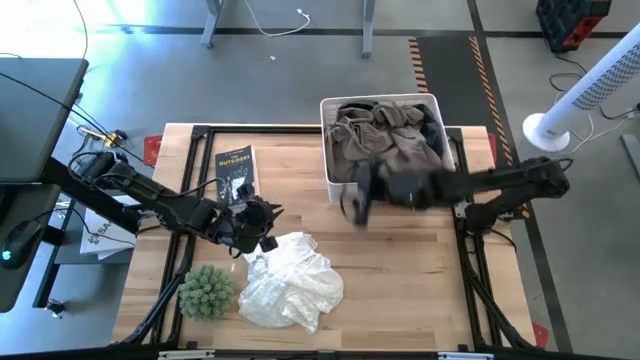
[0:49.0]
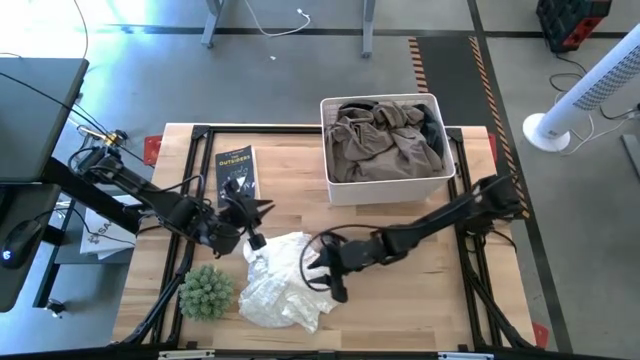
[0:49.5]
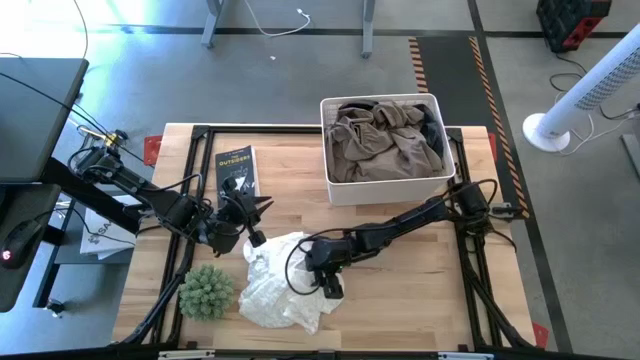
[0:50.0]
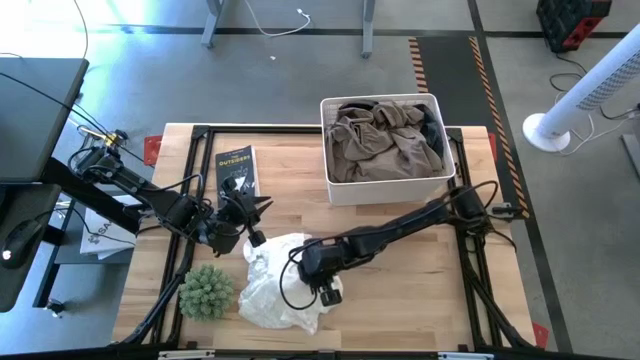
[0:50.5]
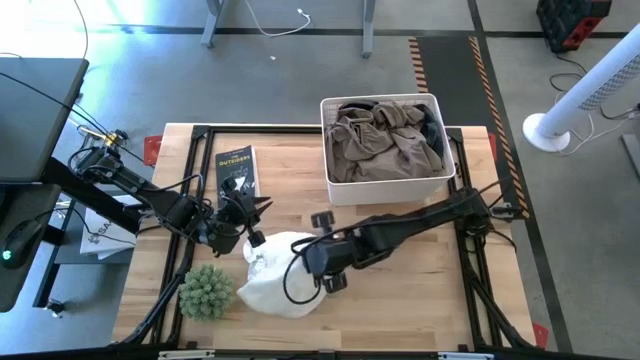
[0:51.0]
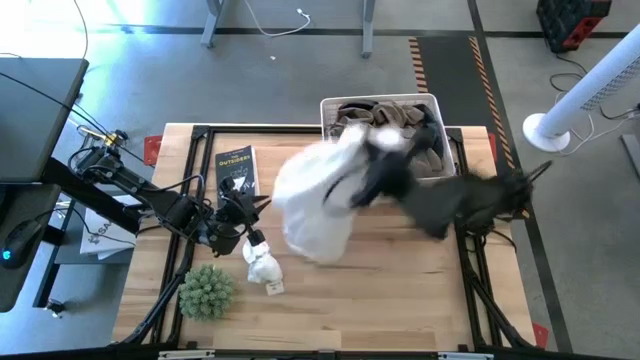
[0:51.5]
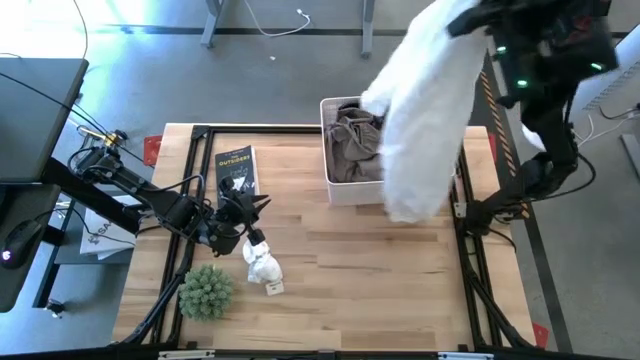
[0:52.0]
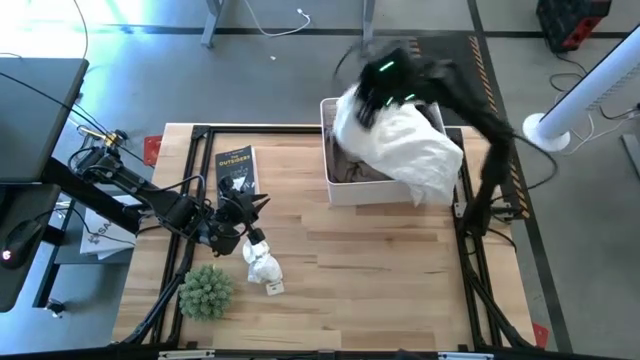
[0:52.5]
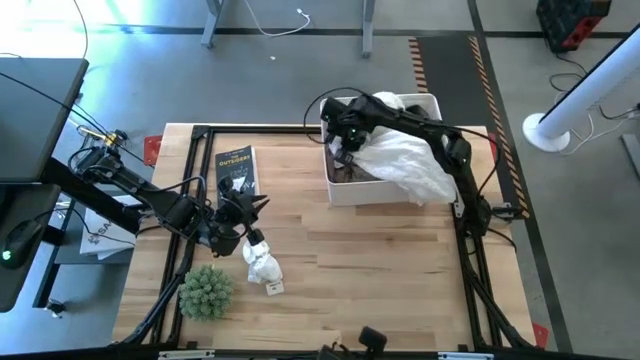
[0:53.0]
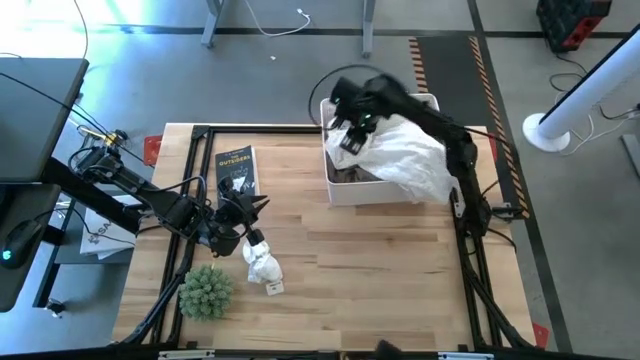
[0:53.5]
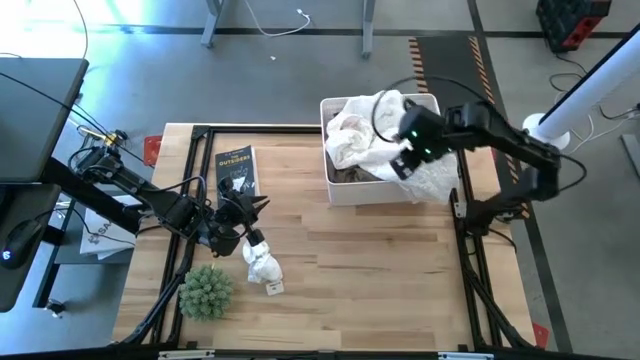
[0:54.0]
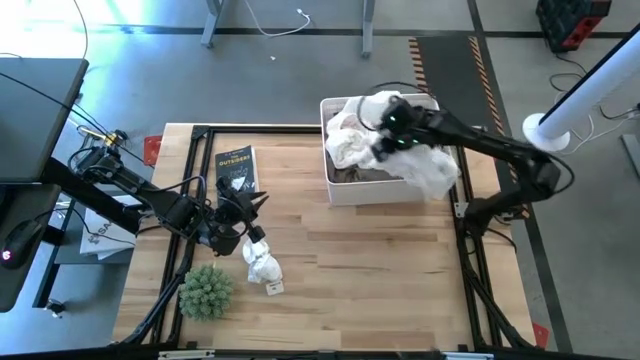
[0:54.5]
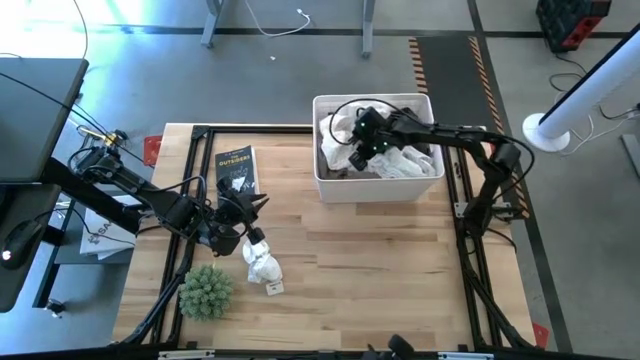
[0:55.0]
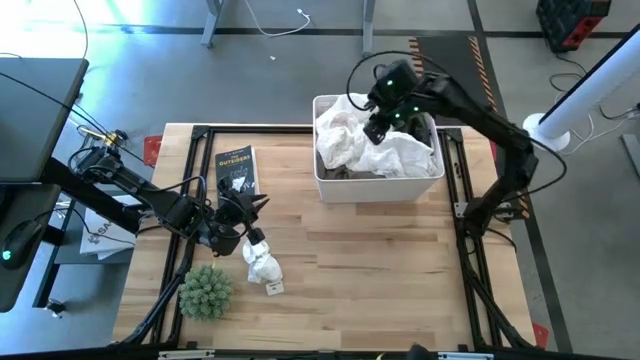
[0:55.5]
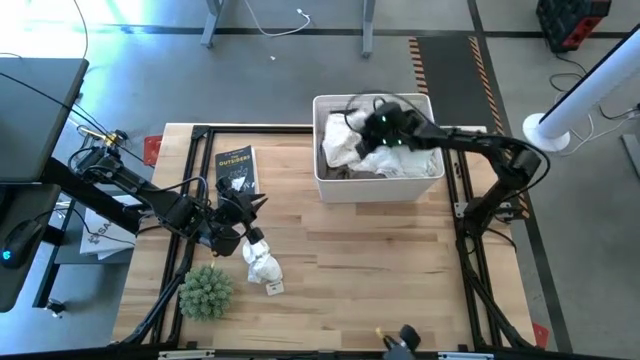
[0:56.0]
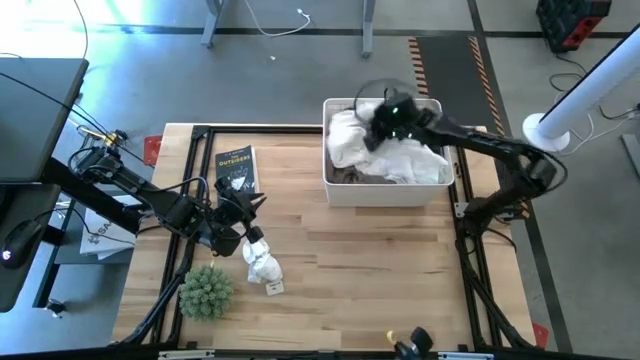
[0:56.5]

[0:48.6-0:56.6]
Task: Sort clothes
Put the white shirt into the white bin

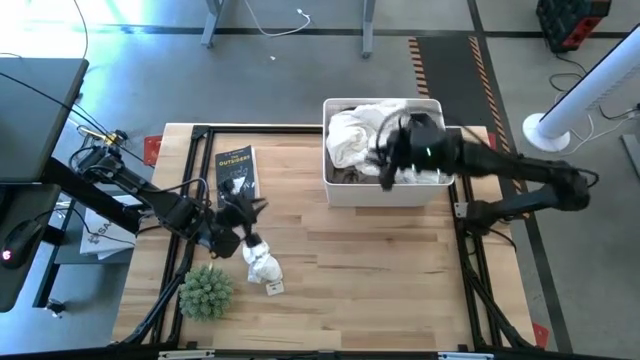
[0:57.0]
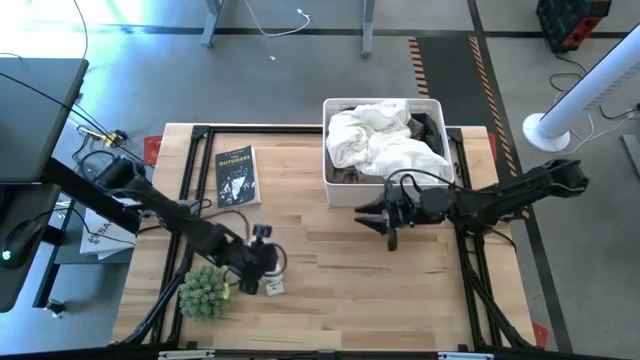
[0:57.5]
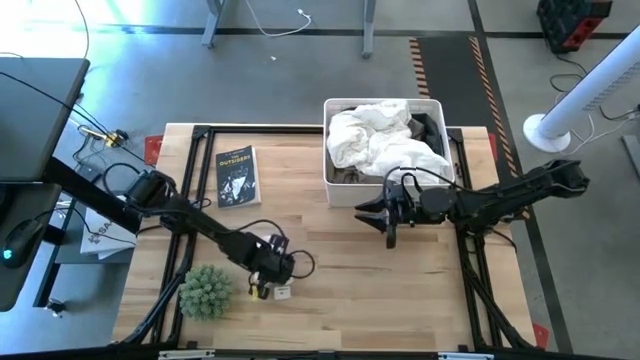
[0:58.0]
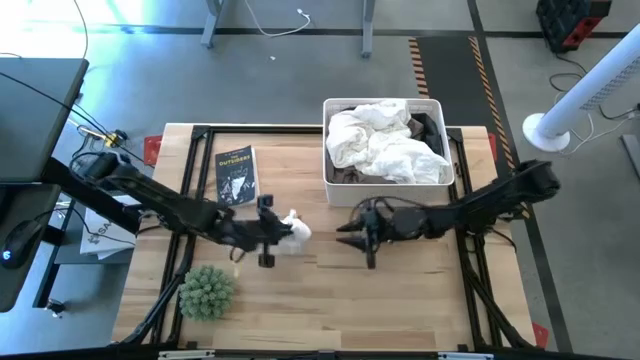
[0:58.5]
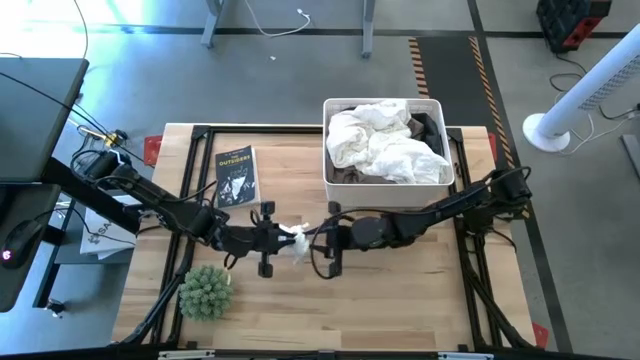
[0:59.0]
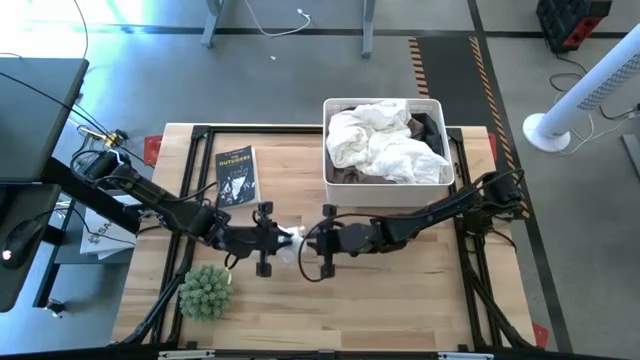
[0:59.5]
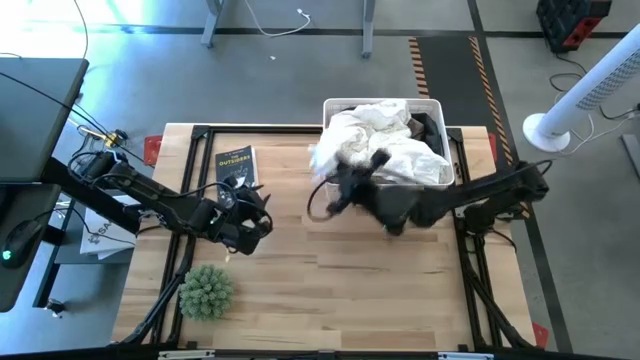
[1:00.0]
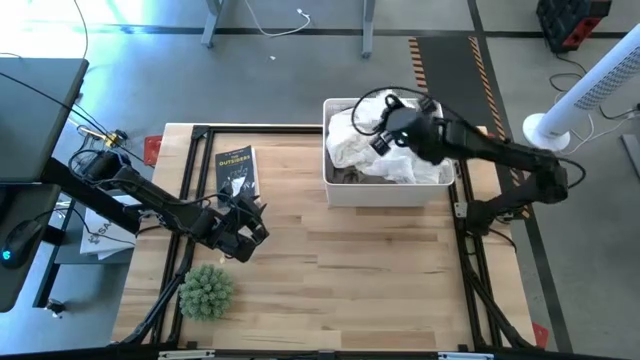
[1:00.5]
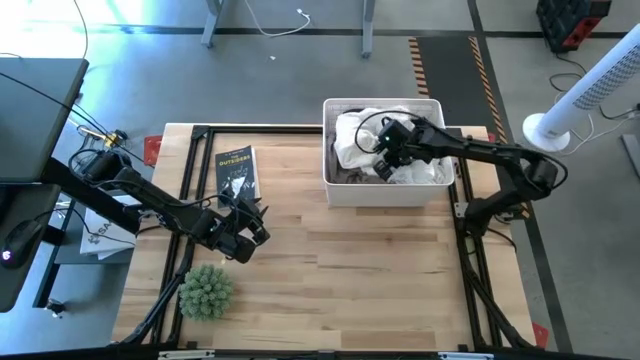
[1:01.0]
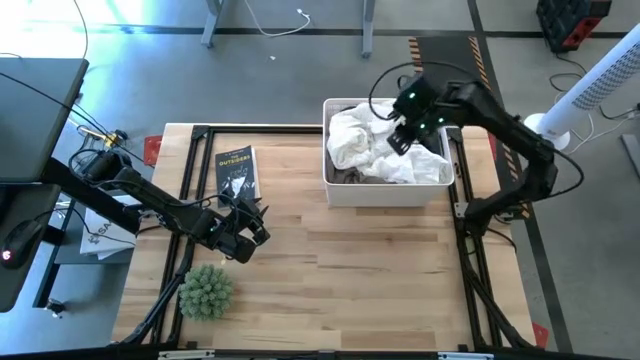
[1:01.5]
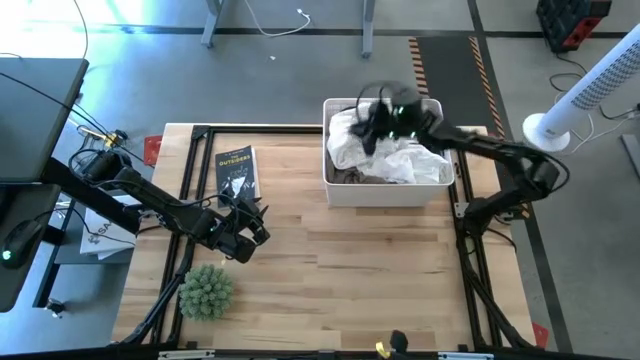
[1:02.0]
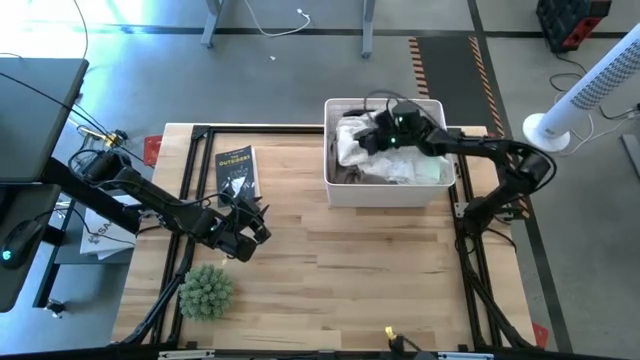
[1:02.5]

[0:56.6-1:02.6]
Put the white socks into the white bin

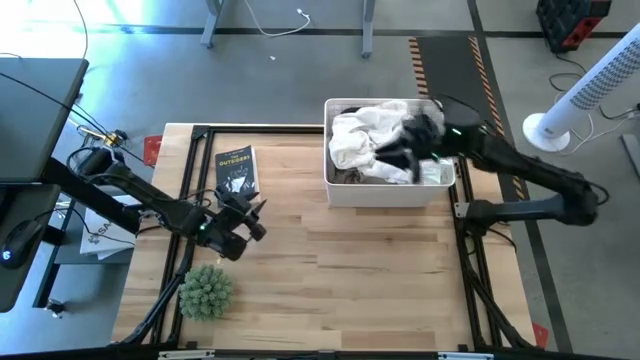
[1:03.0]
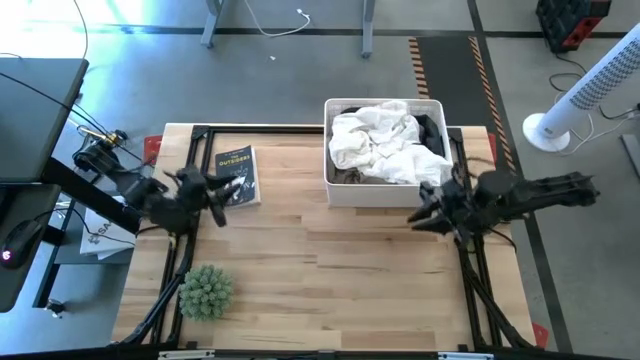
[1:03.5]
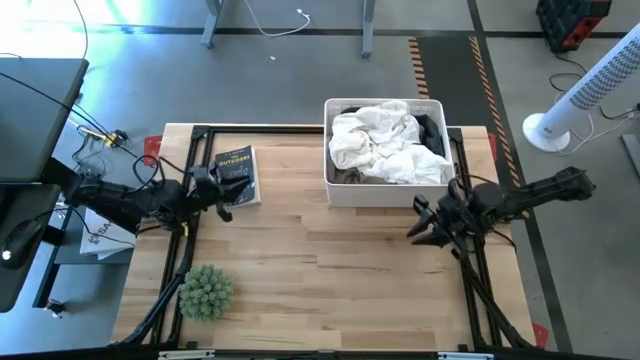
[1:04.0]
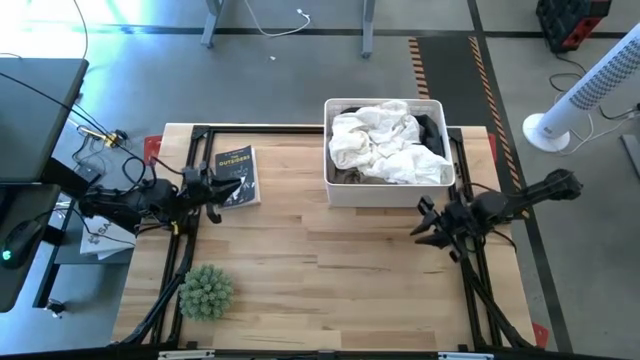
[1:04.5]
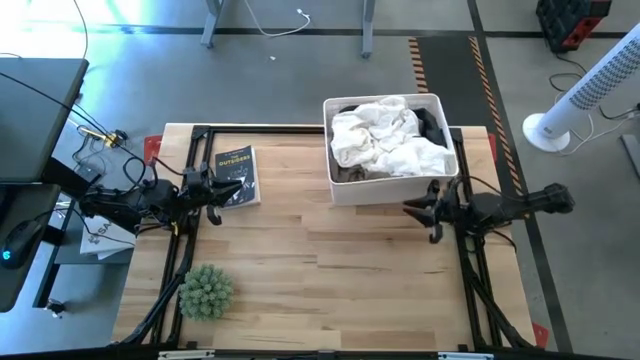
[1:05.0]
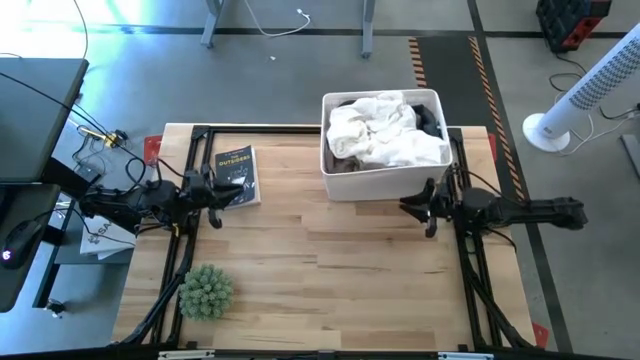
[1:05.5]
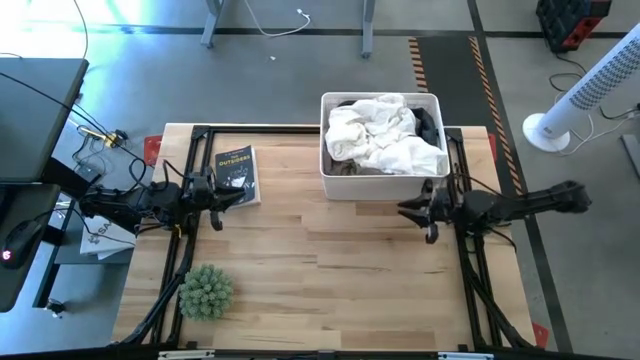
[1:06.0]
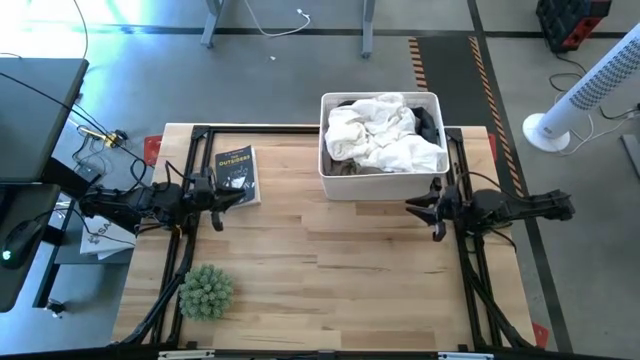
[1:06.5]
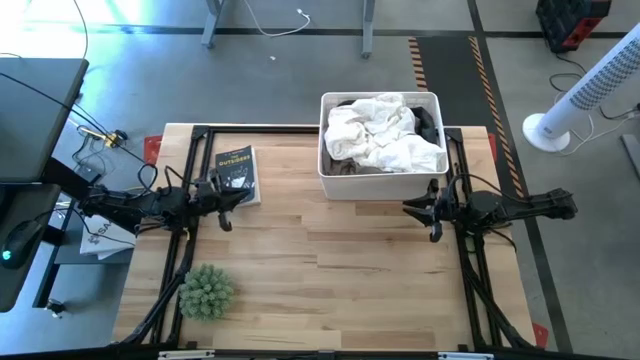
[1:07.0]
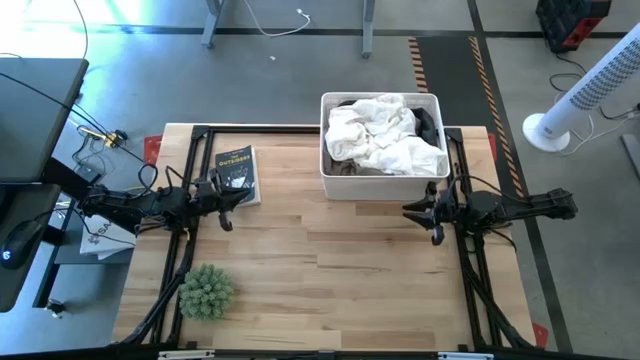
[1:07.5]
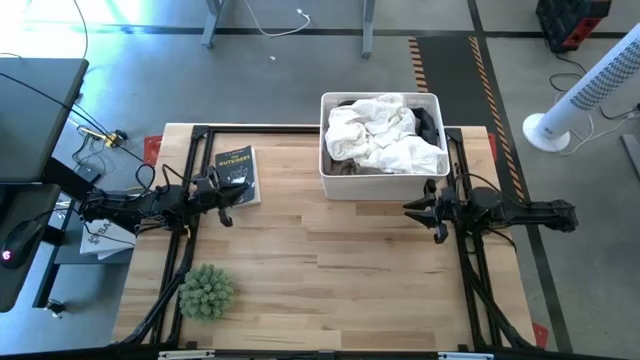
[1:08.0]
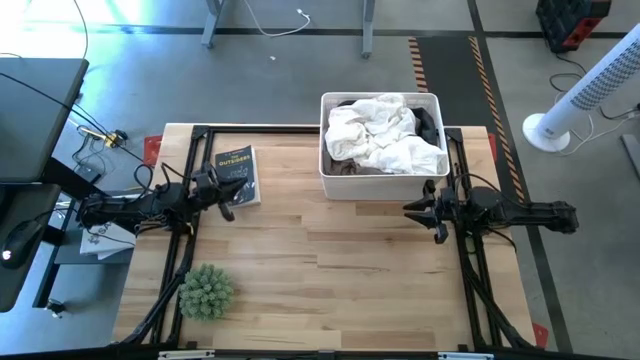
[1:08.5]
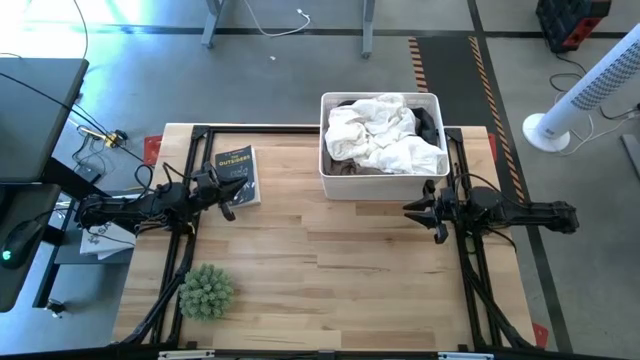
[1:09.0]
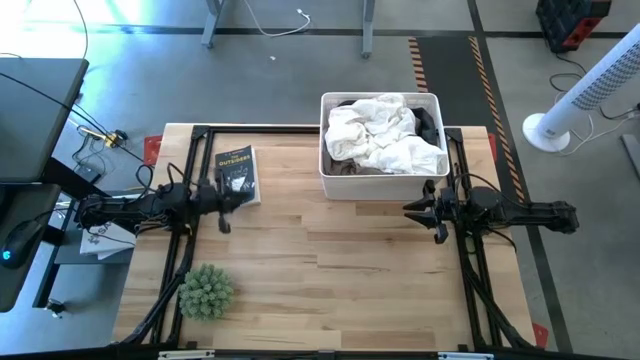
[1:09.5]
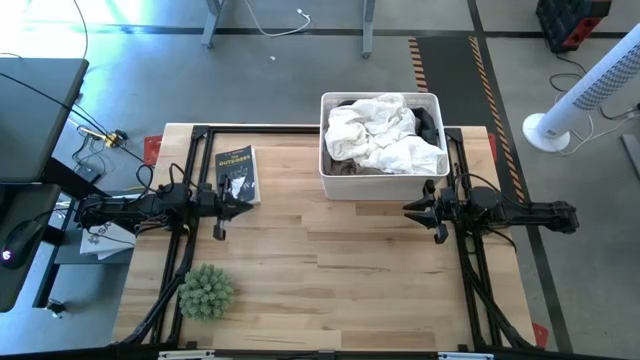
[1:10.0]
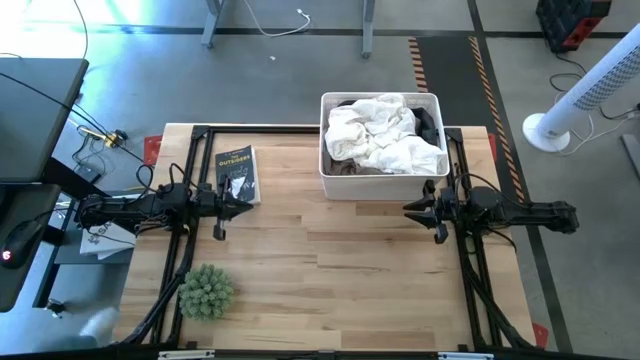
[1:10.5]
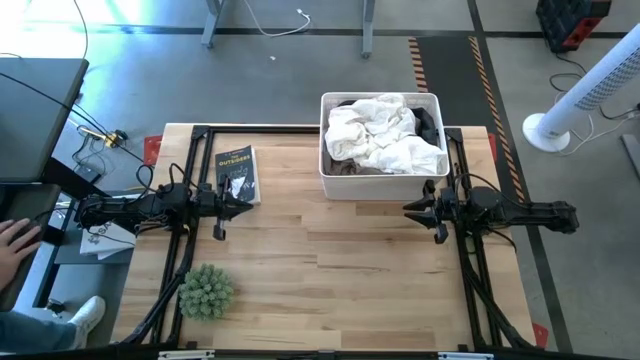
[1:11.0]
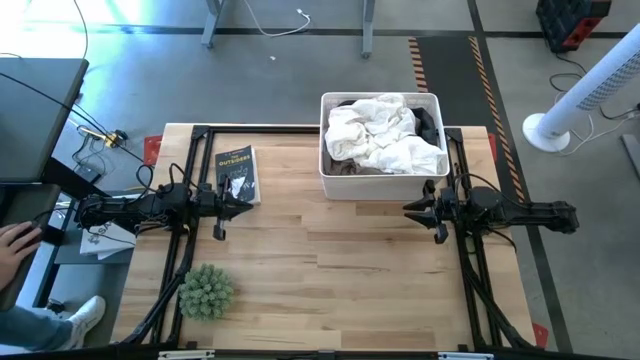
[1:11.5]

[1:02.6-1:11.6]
Return to Home Position
